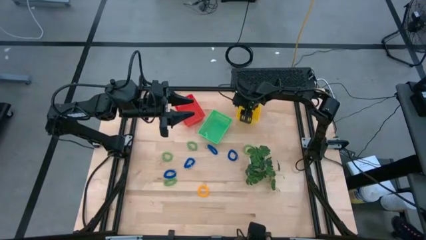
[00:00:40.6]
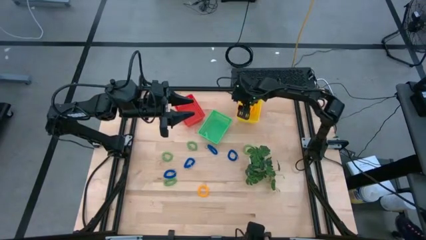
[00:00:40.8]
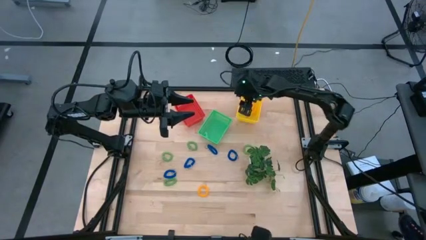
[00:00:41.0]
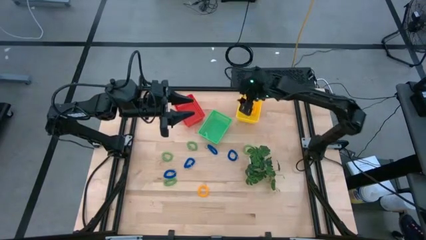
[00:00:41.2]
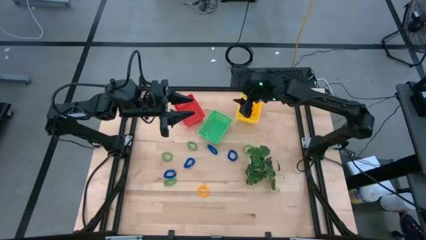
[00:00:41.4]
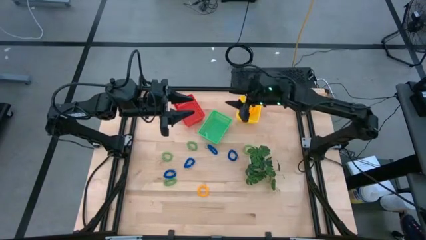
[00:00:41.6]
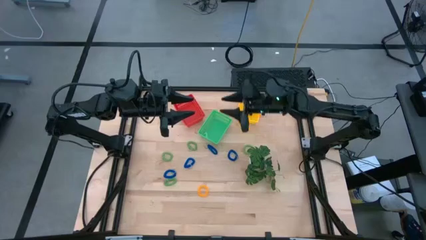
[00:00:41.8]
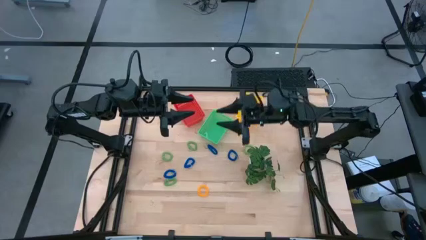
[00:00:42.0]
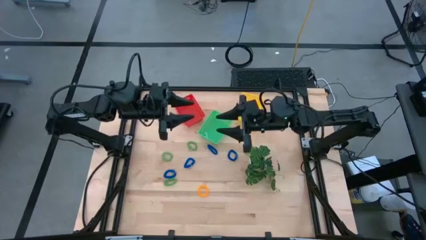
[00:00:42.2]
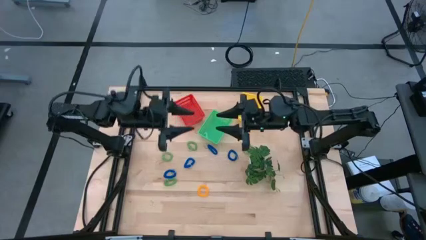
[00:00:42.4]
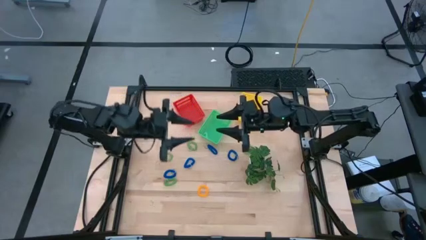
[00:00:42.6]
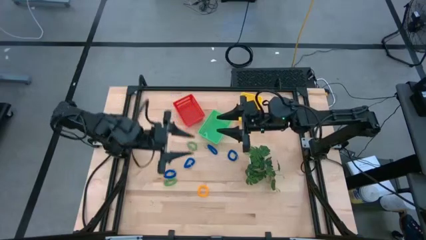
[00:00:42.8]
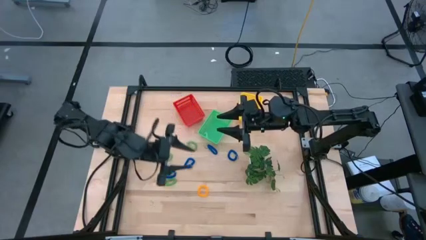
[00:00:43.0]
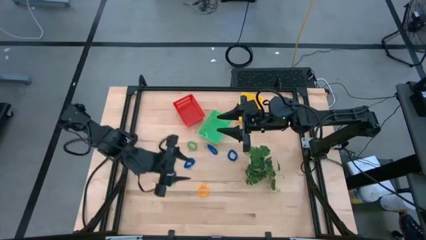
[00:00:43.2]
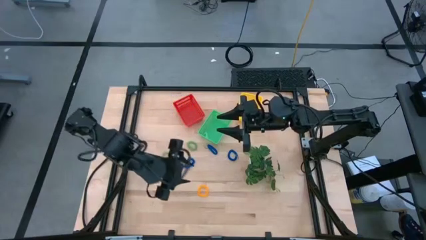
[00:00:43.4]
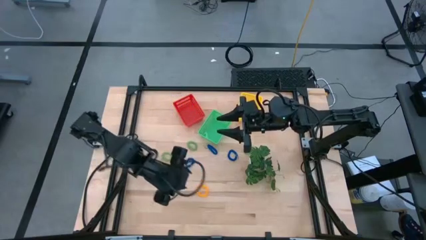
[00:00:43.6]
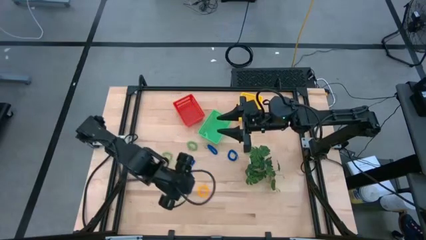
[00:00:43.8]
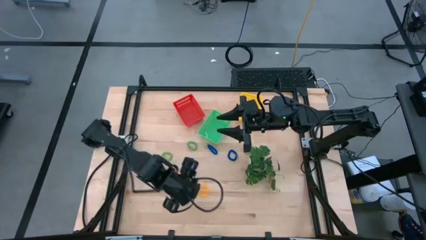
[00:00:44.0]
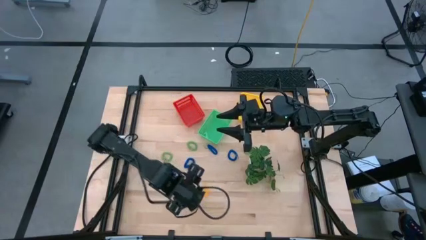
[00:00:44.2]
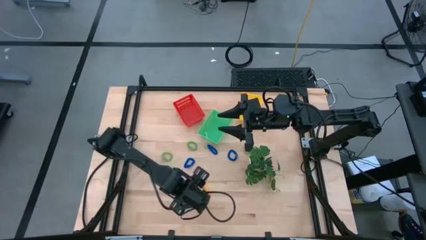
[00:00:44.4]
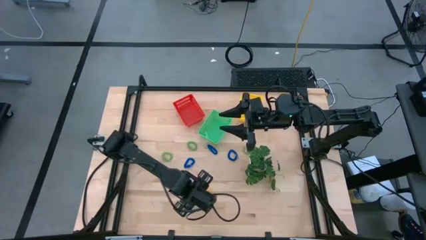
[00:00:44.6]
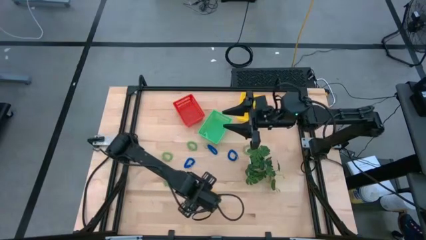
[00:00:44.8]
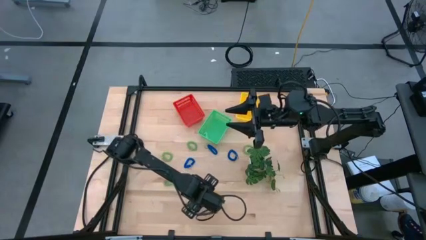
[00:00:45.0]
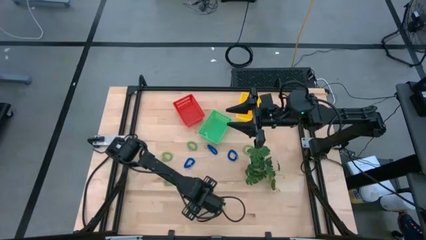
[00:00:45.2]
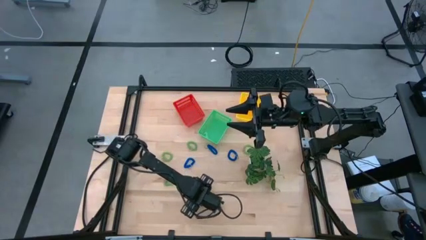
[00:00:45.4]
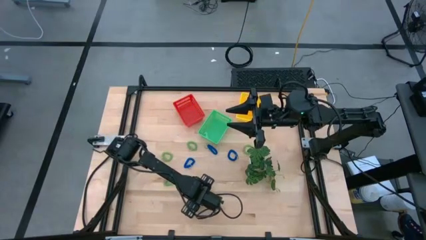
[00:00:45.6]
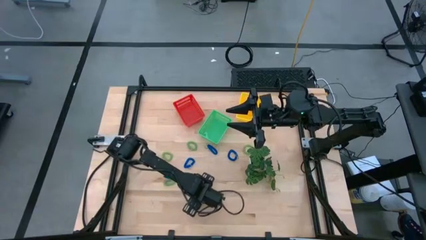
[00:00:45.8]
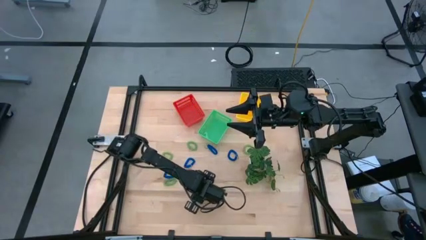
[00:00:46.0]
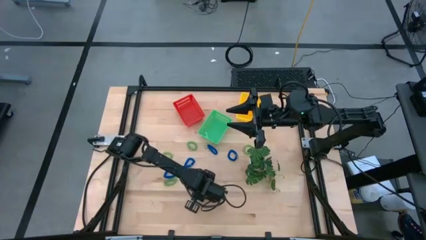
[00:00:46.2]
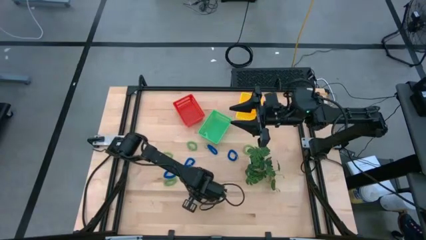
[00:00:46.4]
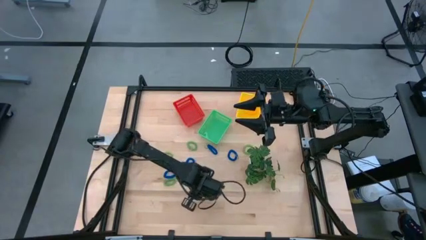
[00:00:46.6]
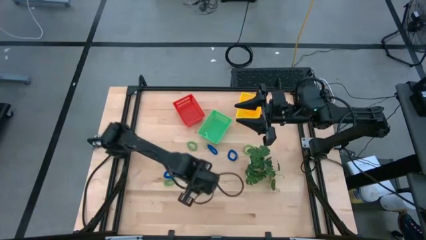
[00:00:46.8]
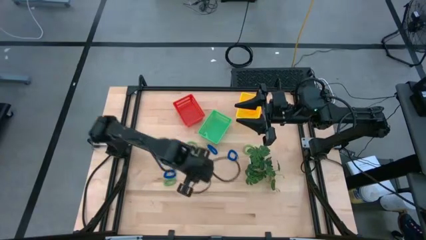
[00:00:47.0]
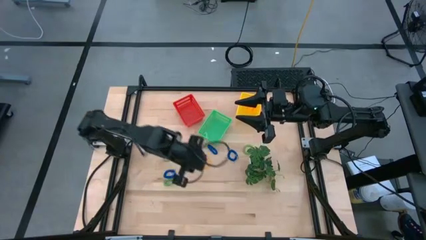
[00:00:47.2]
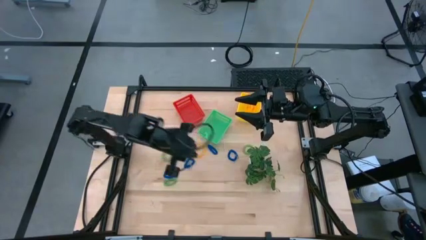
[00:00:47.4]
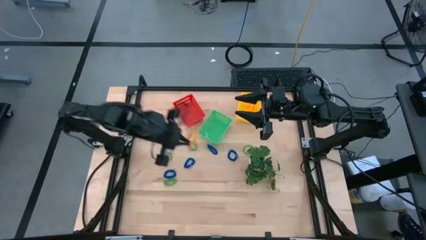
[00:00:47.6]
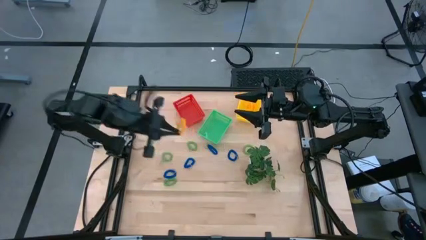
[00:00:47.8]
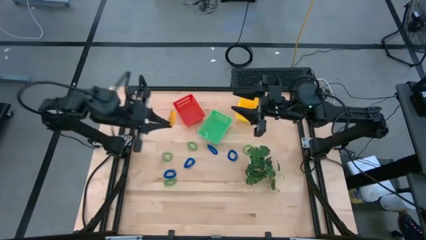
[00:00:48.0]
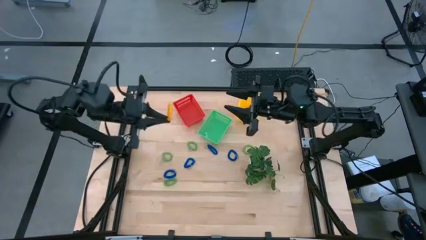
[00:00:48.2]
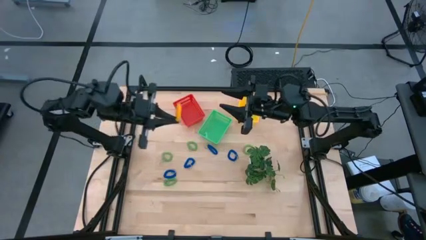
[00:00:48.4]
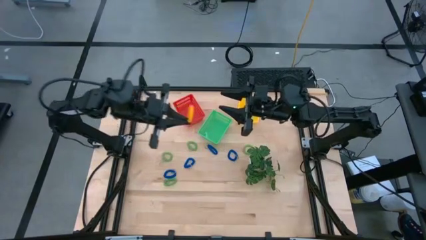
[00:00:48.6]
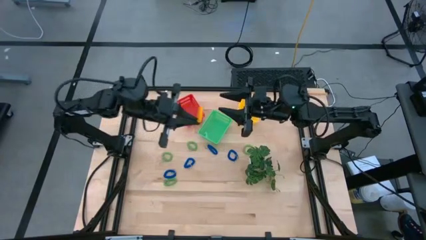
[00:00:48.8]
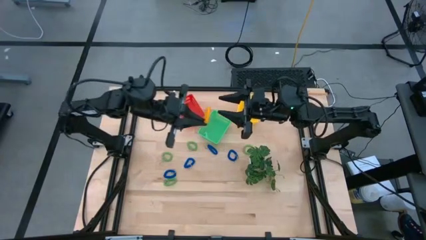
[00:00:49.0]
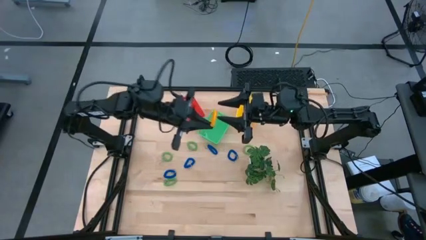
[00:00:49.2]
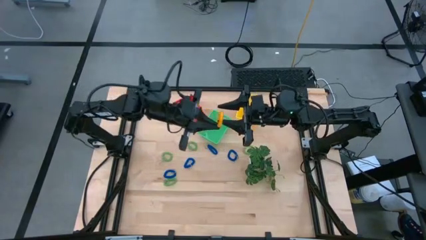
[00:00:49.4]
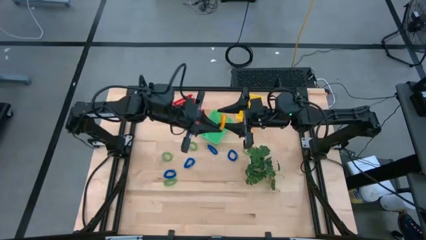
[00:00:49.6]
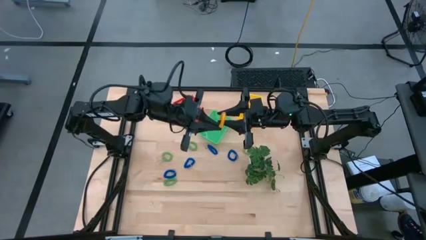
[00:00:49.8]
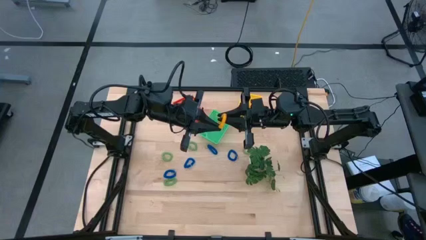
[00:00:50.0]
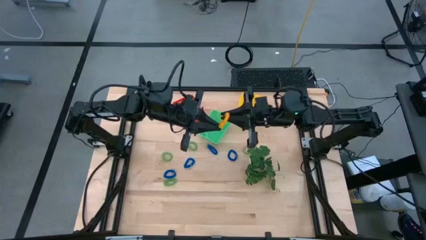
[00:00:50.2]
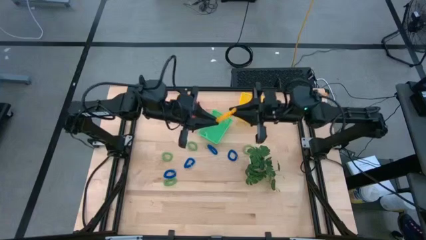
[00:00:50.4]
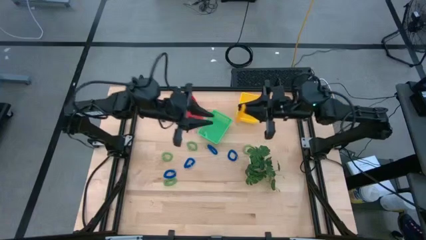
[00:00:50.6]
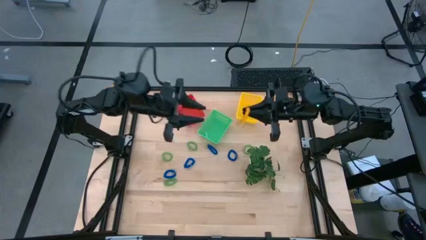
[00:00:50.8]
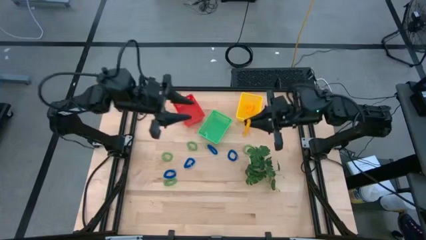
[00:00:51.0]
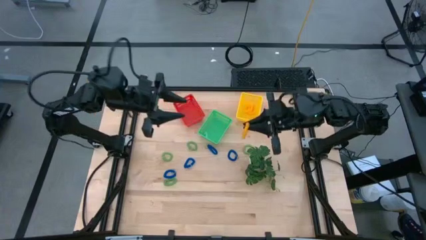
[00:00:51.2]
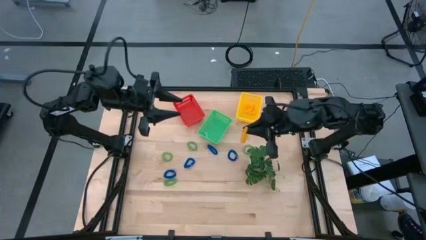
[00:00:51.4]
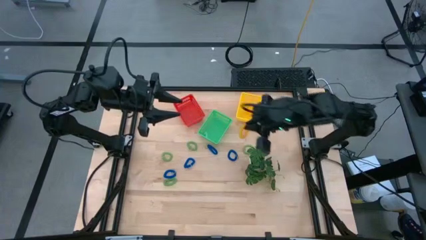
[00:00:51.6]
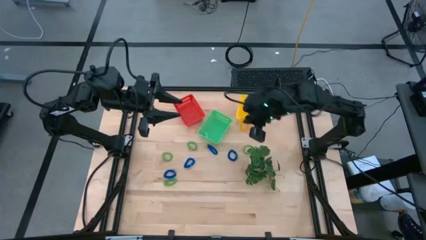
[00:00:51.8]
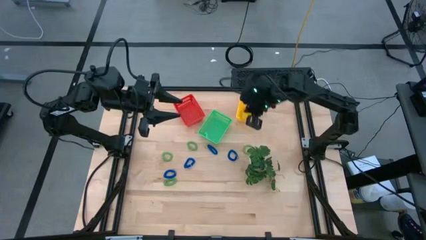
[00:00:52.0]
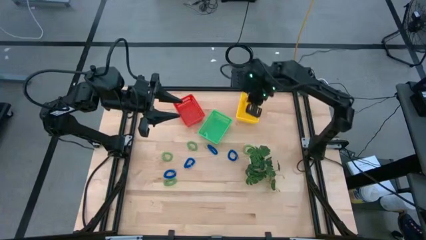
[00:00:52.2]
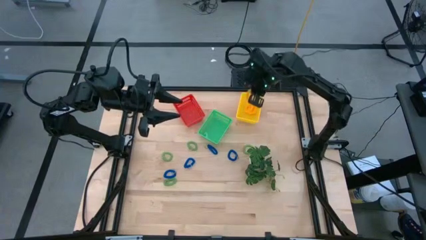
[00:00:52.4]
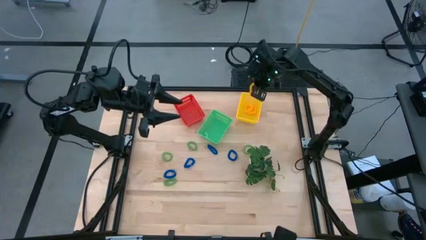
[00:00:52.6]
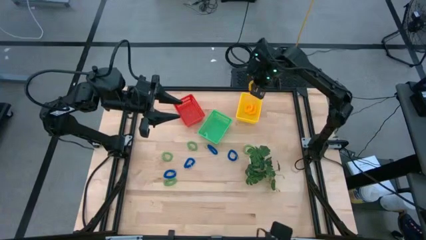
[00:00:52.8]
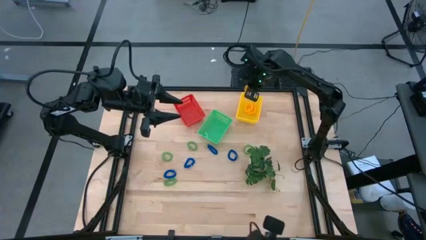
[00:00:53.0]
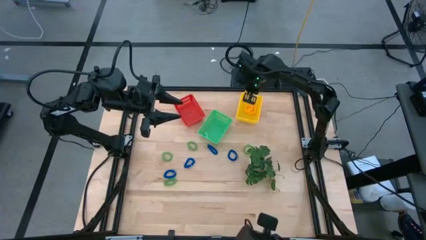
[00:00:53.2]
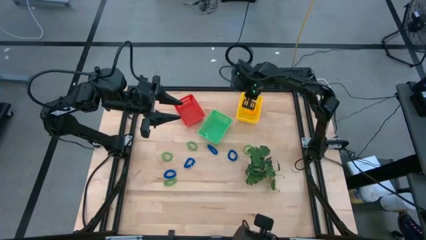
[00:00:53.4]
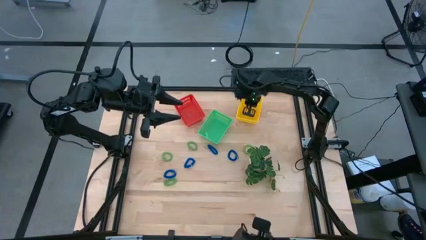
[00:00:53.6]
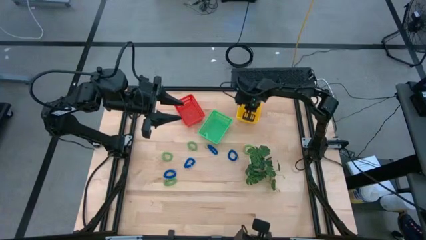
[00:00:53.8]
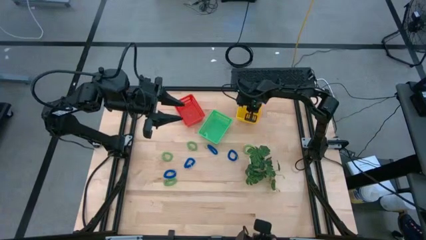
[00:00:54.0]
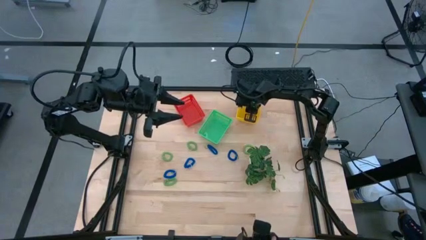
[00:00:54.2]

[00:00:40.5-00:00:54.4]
Task: Sort spring keychains
Put the yellow spring keychain into the yellow bin
